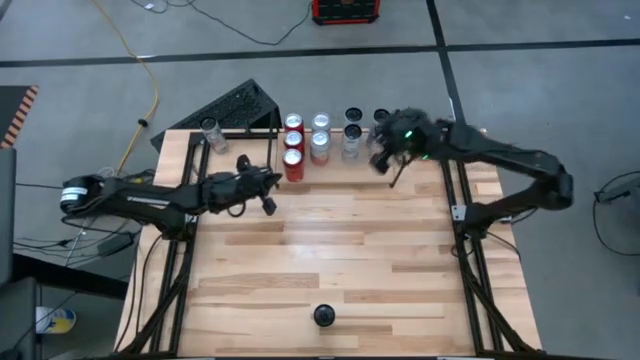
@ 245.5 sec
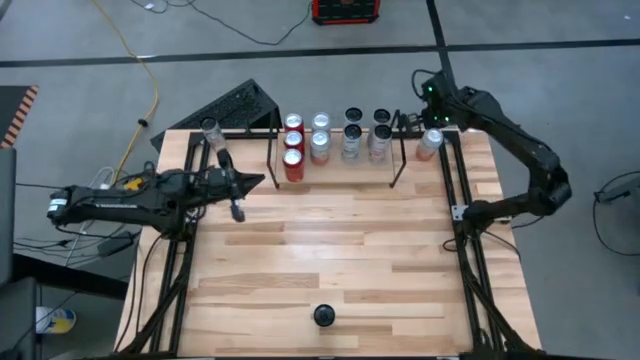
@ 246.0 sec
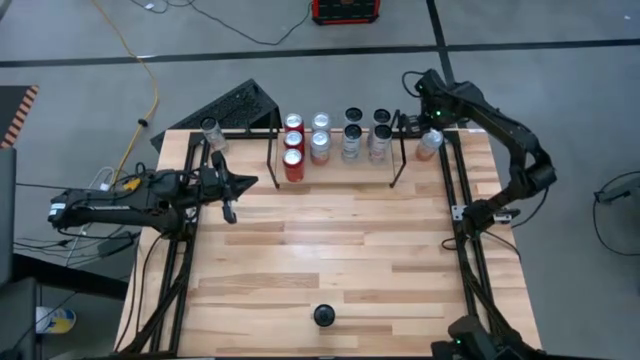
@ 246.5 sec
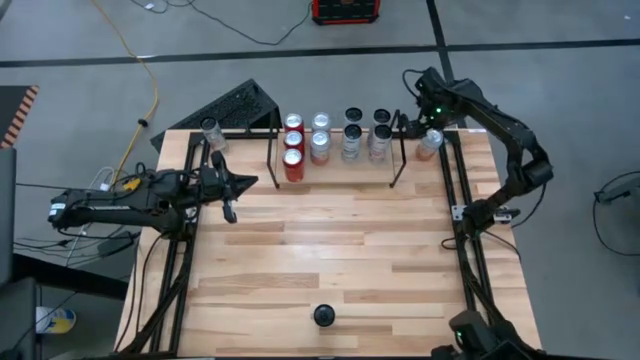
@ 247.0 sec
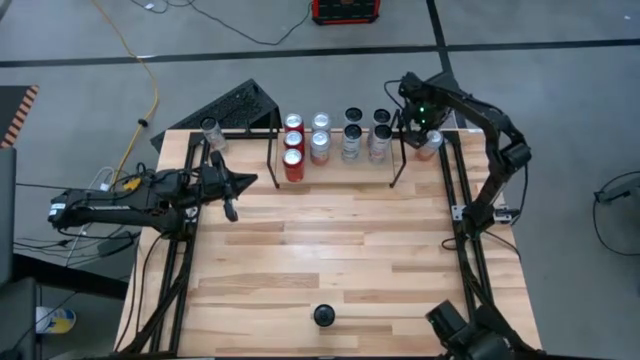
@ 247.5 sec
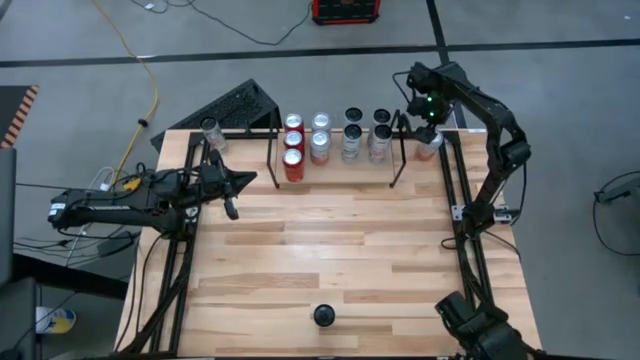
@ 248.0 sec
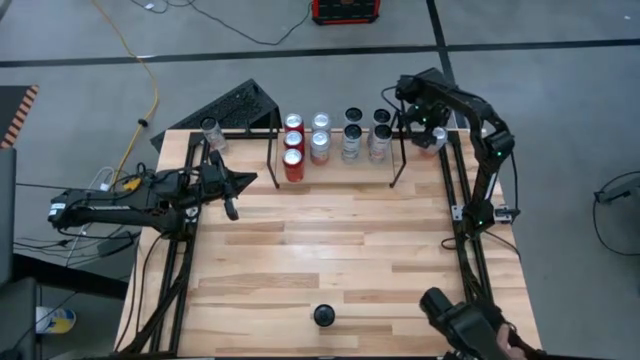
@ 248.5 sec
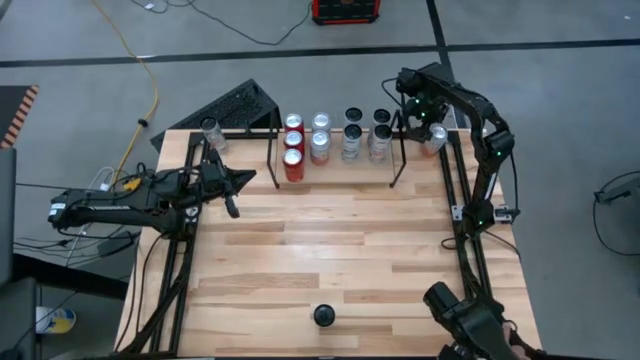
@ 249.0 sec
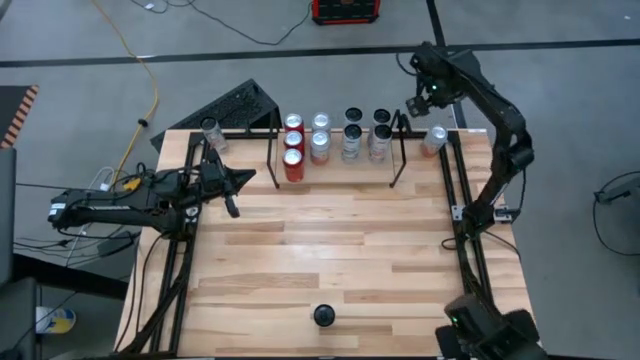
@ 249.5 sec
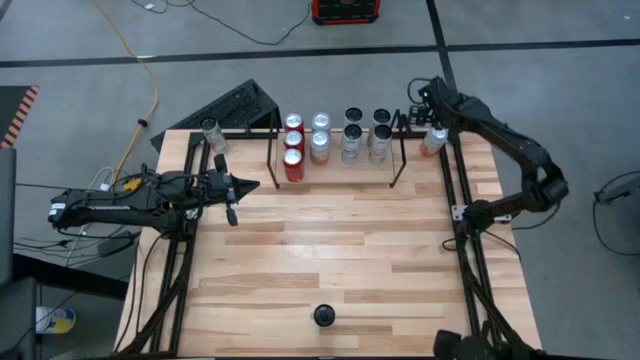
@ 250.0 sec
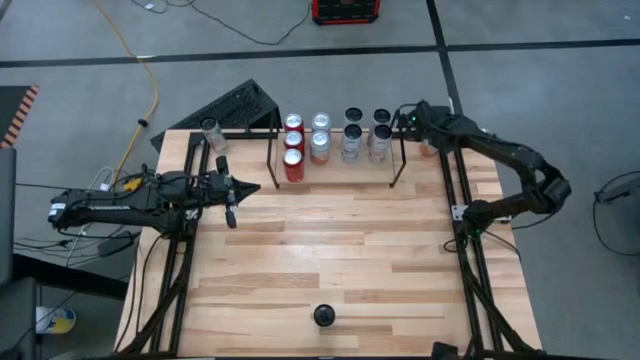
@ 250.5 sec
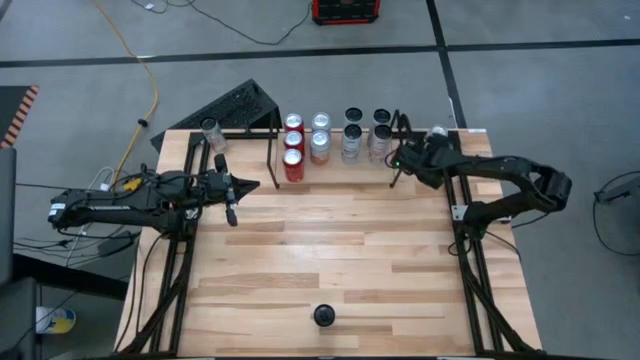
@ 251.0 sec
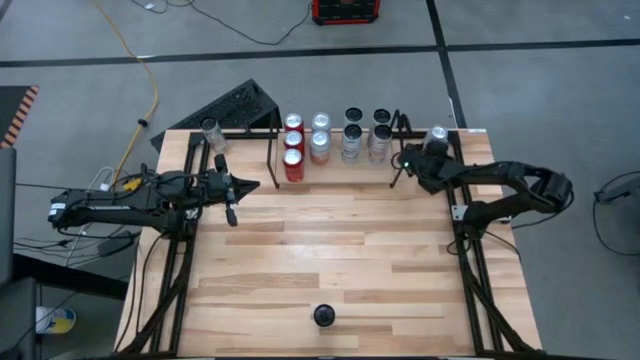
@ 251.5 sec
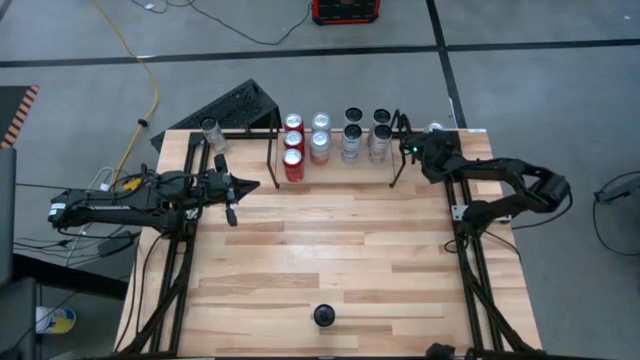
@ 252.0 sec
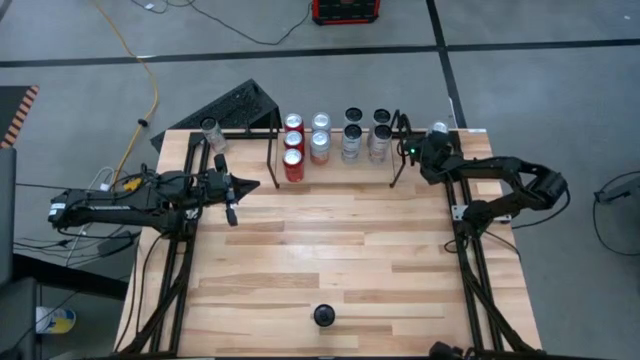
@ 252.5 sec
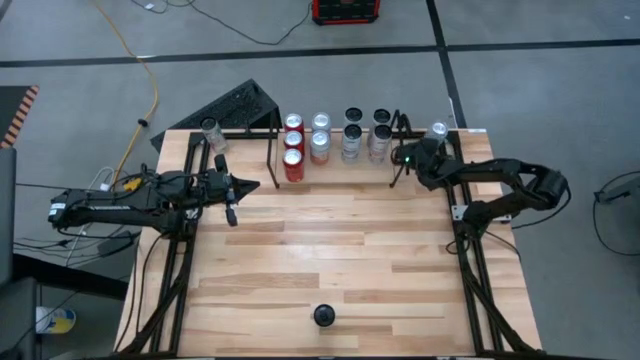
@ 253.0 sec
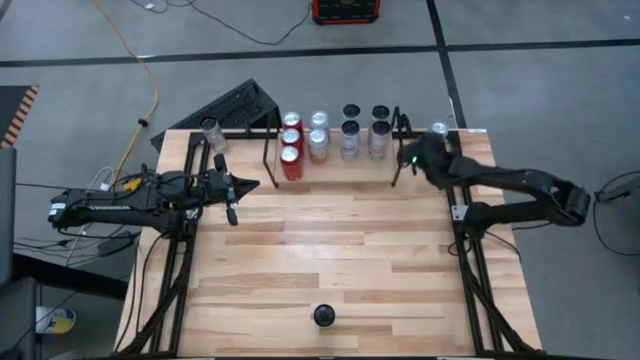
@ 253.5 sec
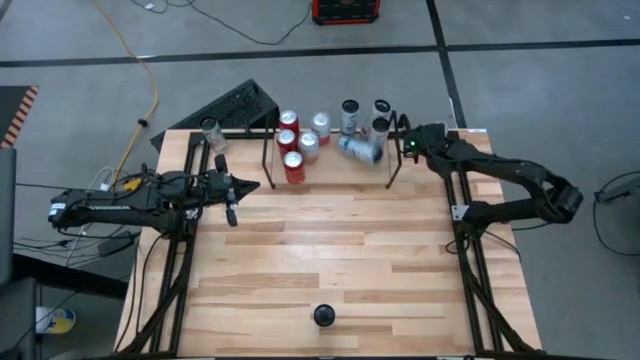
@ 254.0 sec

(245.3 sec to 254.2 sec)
Task: Place canned beverage on shelf
Put the orange white soda can on the shelf aligned with the other orange white soda can
